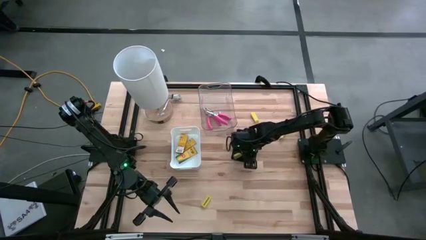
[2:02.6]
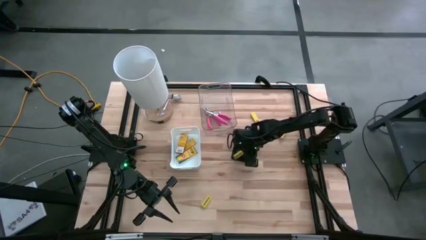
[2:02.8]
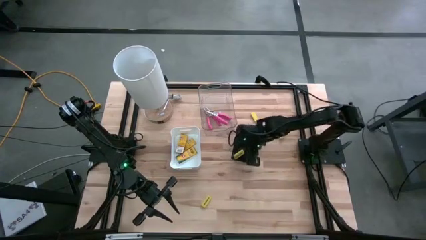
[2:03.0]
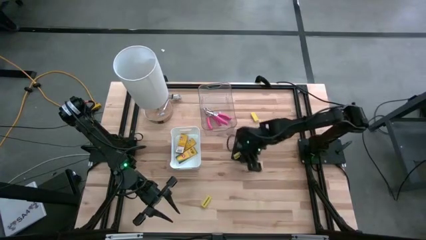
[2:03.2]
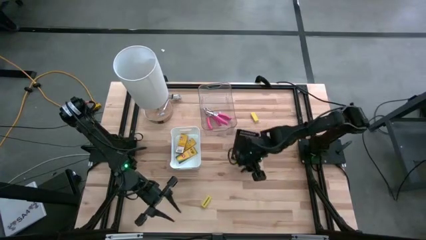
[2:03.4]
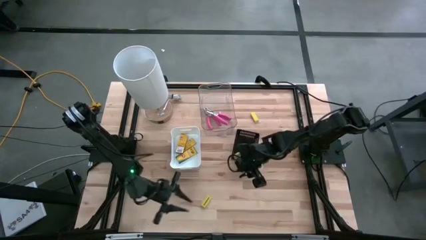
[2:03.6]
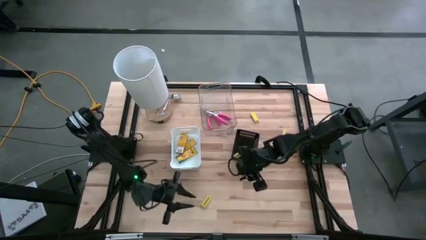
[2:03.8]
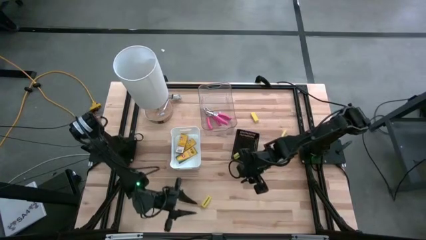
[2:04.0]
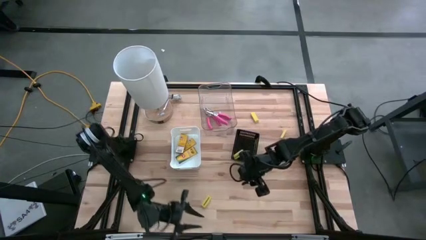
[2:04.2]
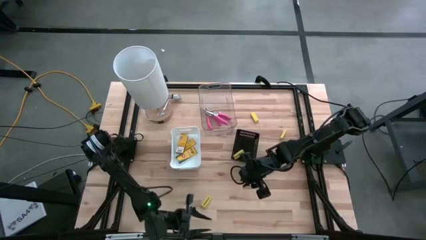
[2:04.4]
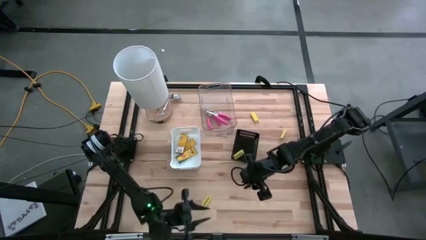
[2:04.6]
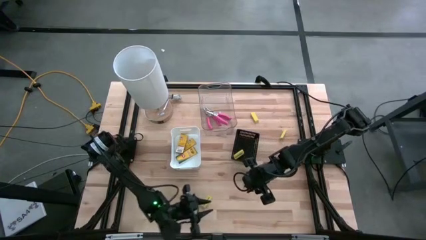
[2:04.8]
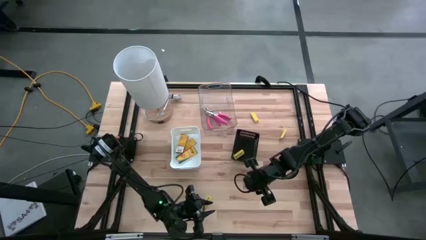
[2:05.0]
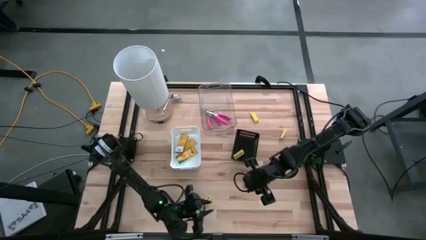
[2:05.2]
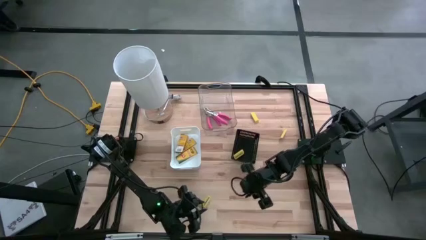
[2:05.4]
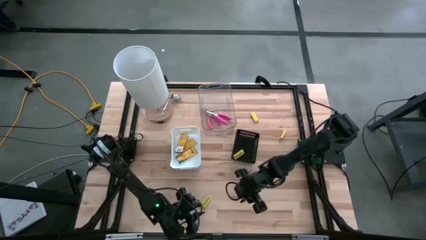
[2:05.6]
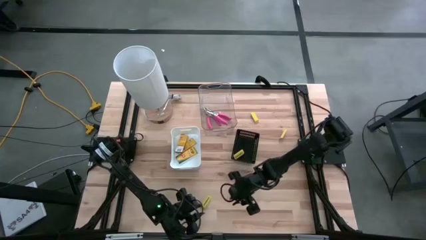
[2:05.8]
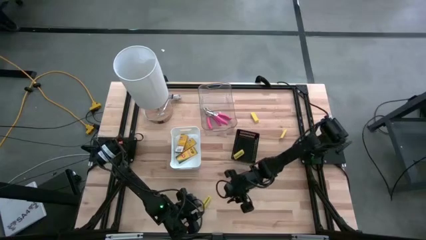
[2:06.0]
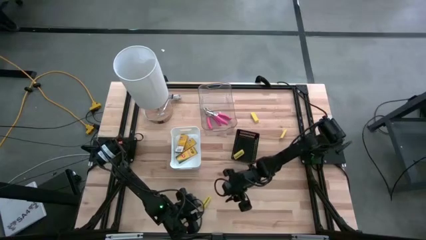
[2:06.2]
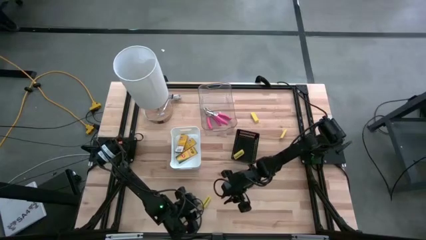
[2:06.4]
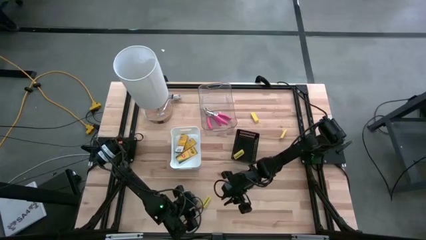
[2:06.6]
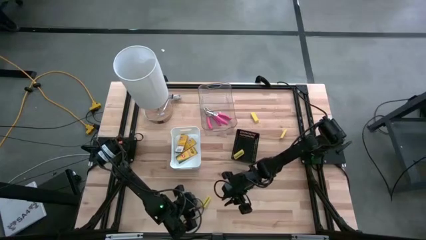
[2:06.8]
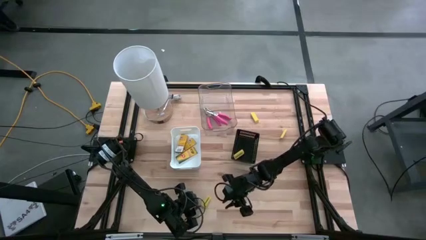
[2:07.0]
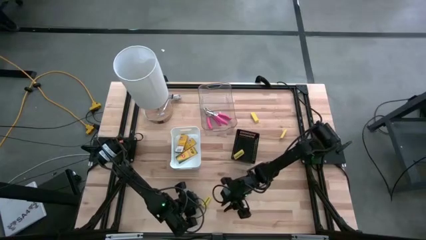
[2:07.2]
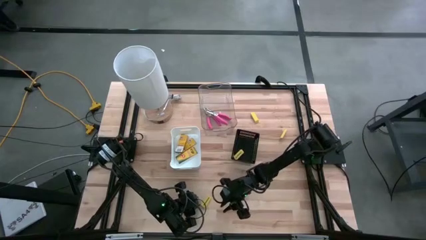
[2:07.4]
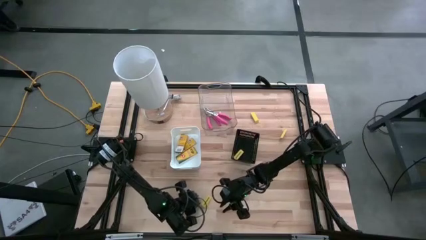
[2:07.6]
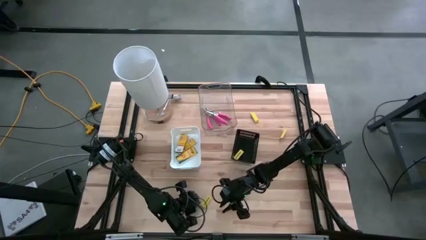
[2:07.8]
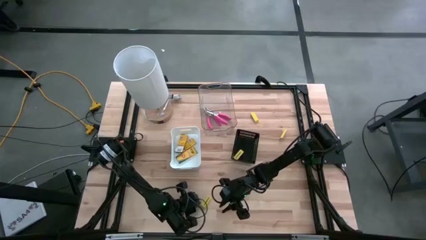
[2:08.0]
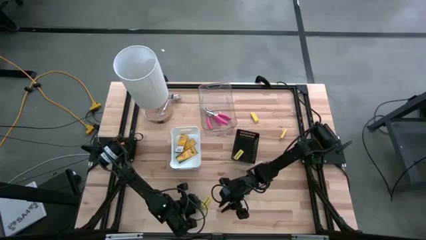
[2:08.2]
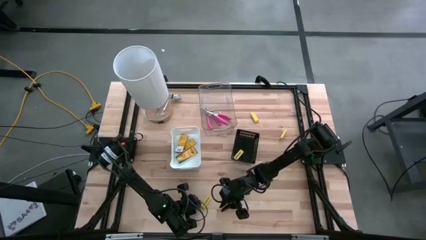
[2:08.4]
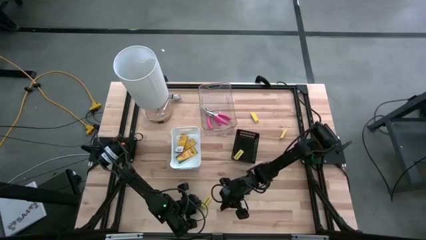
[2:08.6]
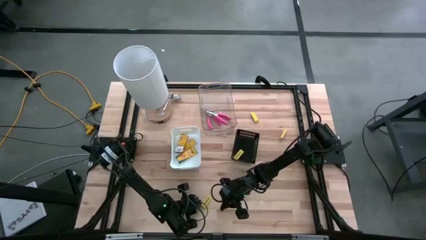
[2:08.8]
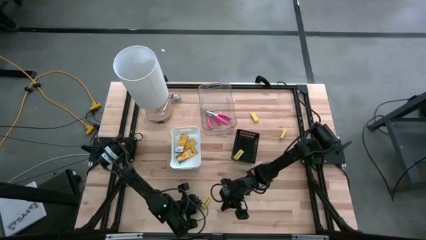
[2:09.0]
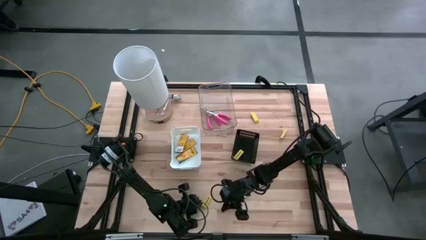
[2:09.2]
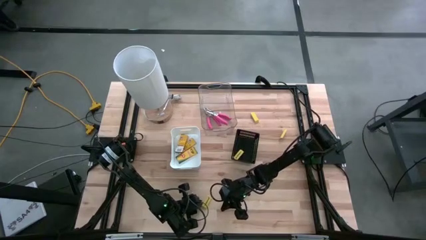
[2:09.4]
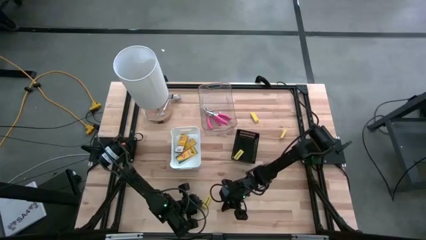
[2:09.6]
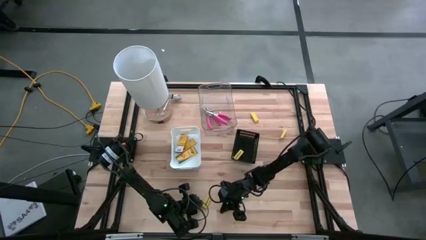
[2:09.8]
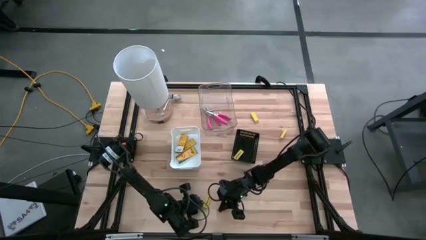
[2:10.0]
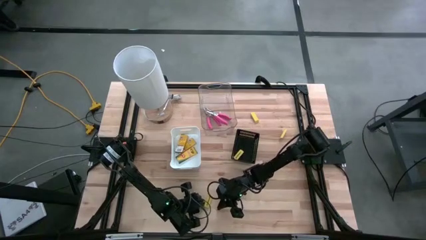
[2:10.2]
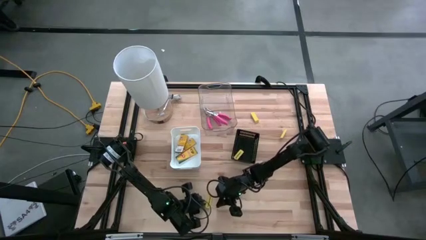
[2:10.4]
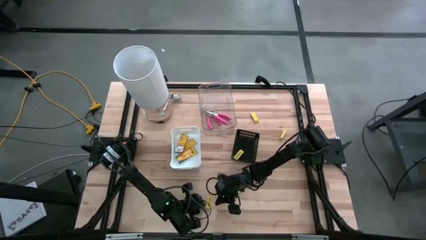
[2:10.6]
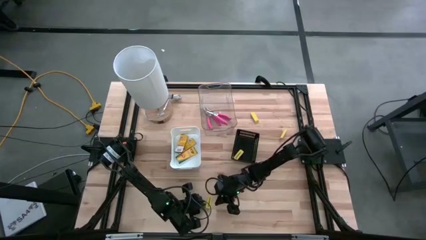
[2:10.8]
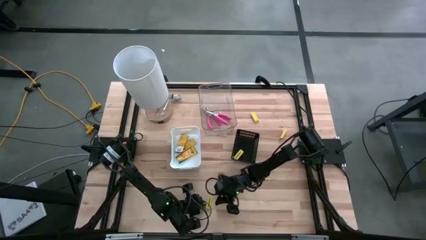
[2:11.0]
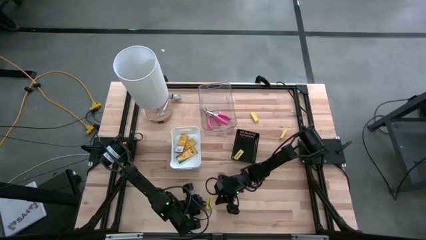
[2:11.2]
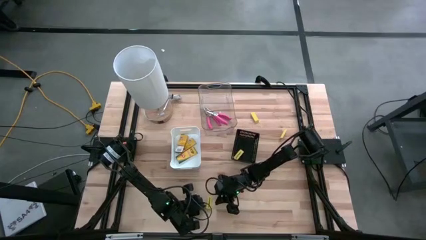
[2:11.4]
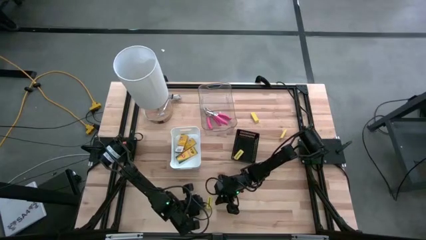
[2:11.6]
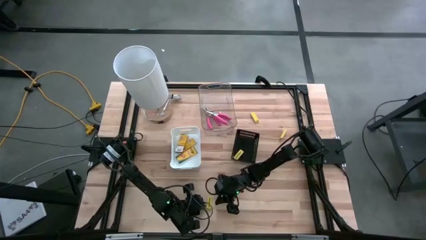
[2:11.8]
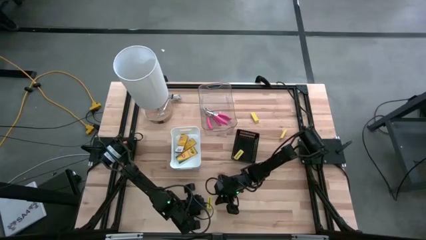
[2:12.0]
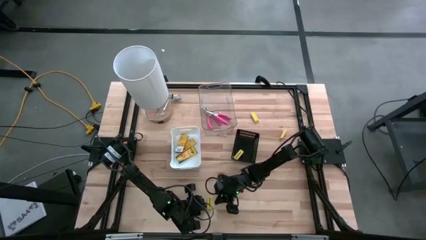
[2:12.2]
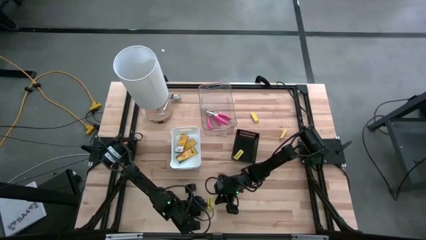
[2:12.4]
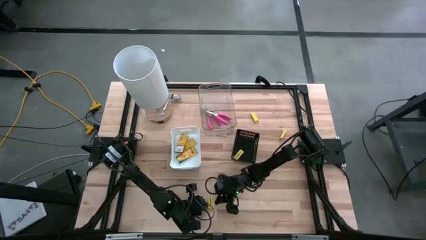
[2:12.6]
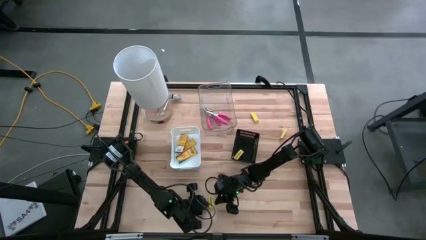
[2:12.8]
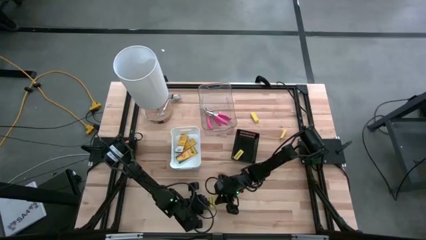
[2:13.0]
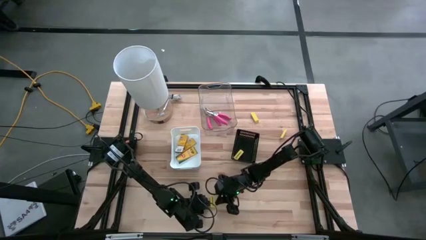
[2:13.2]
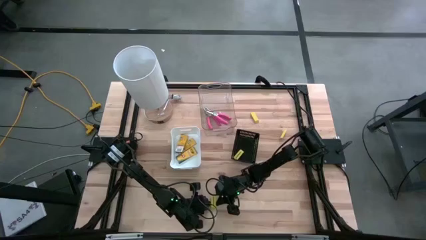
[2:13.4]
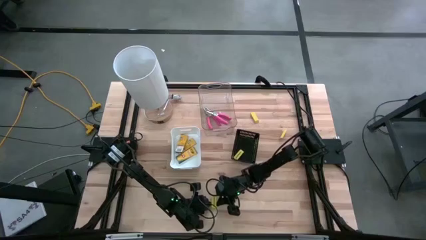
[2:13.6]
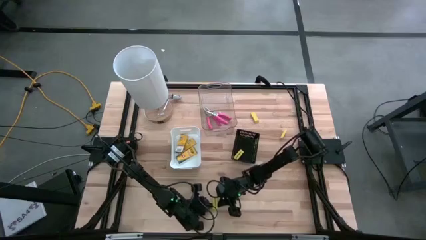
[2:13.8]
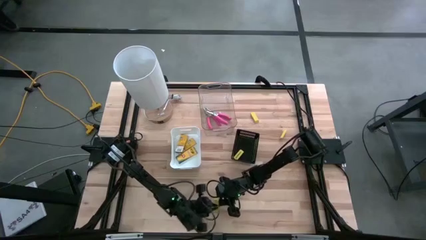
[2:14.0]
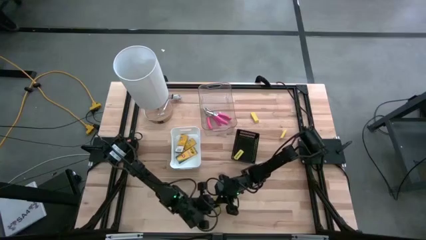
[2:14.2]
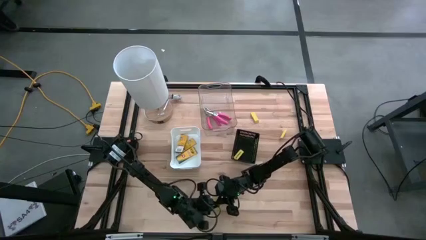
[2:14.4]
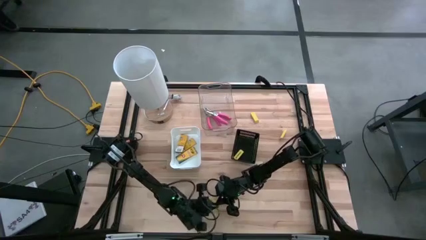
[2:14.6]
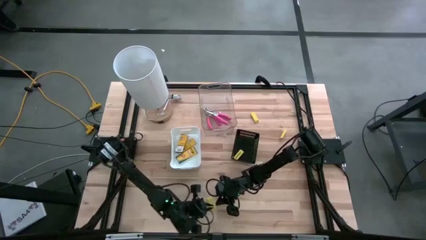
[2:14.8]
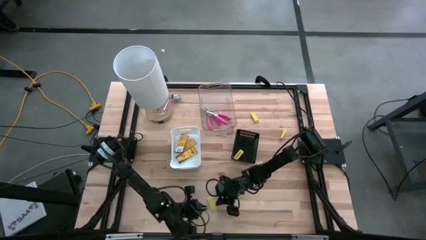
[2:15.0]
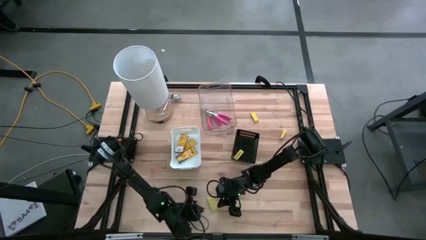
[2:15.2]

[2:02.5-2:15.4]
Task: Pick & Place School Supplies
Put the bottom left yellow eraser into the black bin

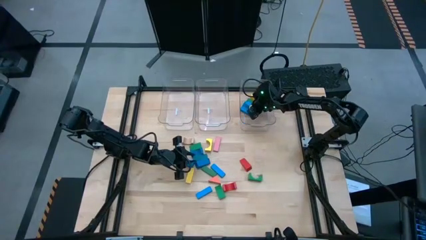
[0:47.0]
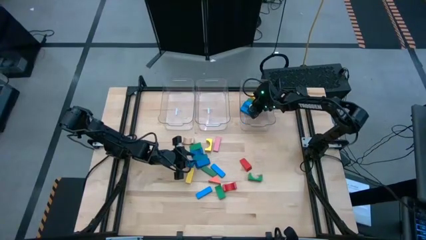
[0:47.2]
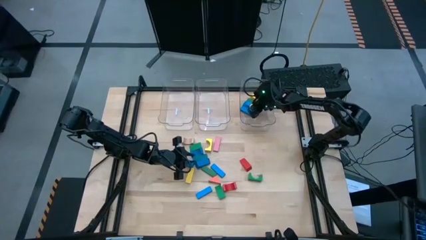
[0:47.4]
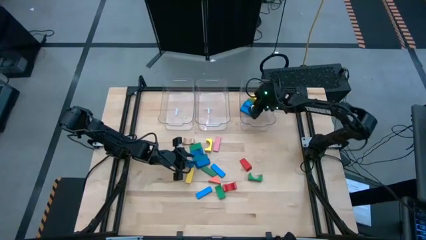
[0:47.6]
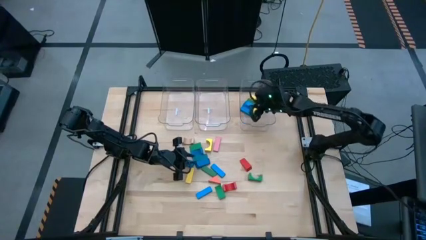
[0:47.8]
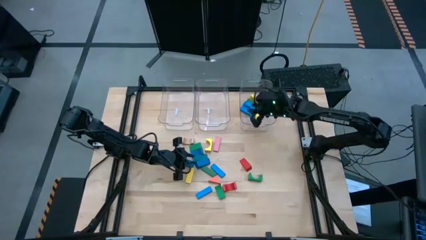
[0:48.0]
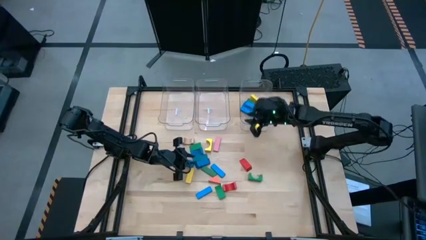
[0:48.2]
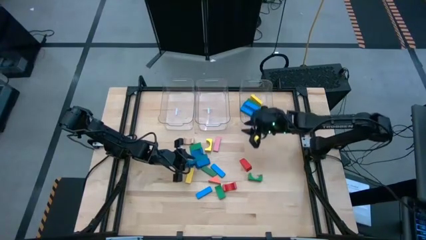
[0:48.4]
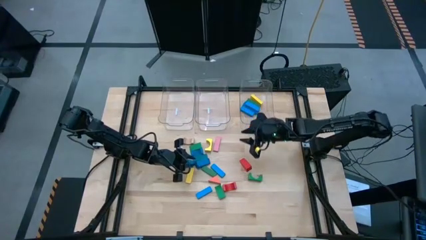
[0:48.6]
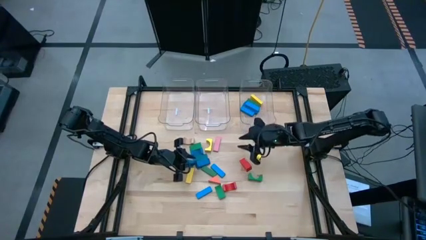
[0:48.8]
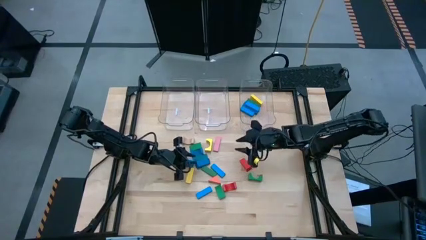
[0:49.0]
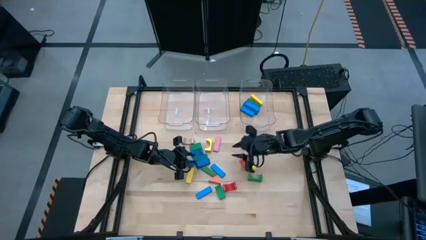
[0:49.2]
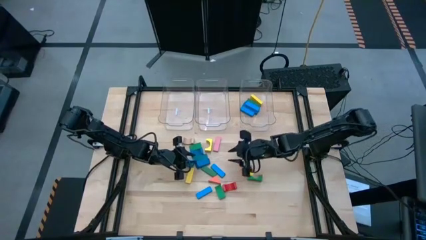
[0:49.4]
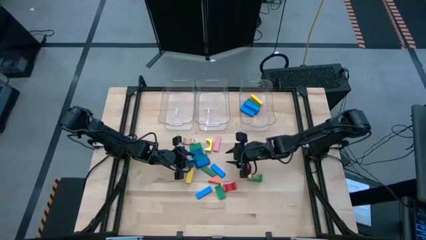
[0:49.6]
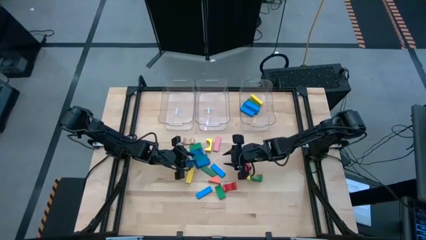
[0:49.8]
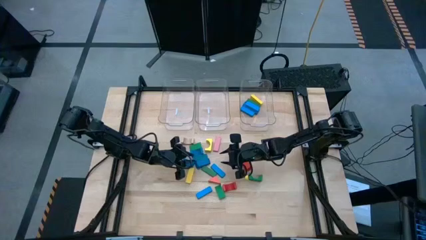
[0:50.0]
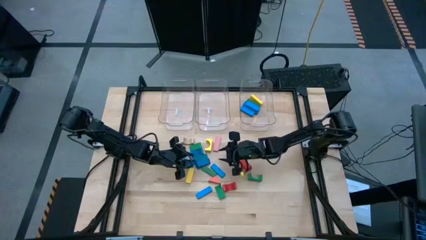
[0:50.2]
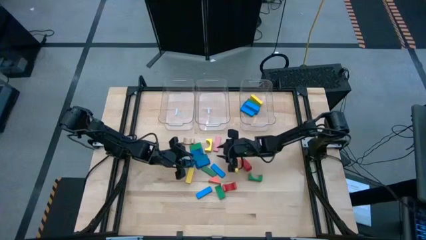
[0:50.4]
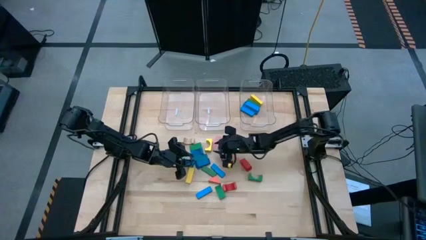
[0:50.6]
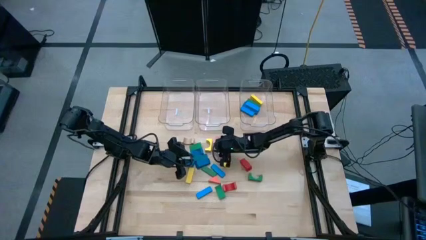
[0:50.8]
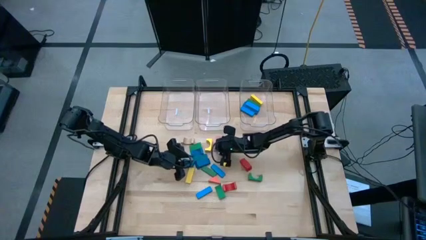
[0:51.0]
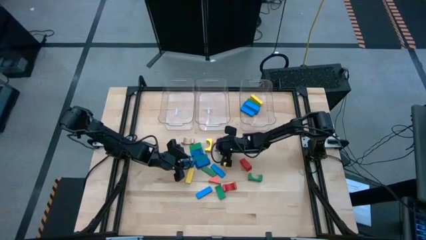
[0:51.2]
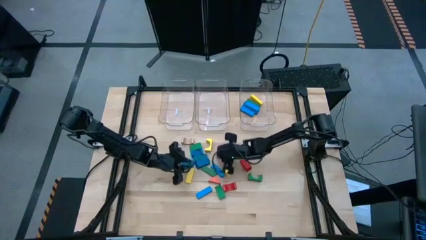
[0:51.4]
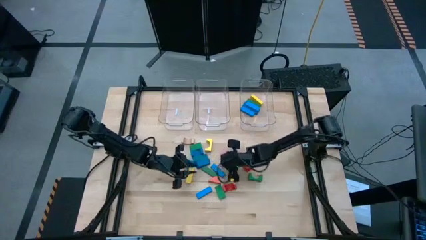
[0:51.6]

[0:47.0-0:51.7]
Task: Sort blocks by size
Adjust the pink rectangular block on the table
